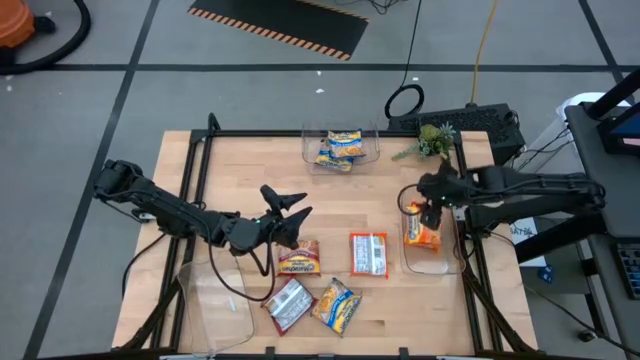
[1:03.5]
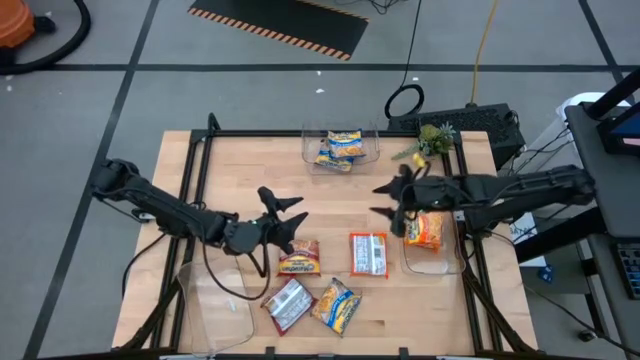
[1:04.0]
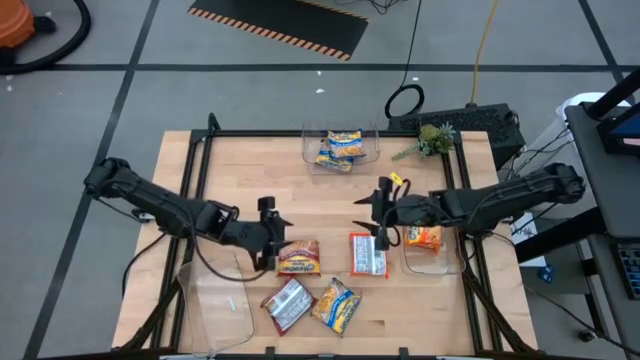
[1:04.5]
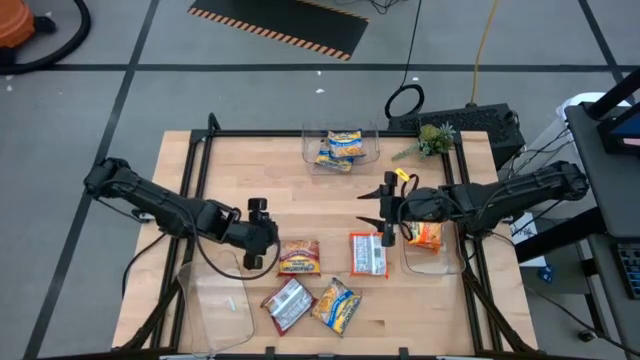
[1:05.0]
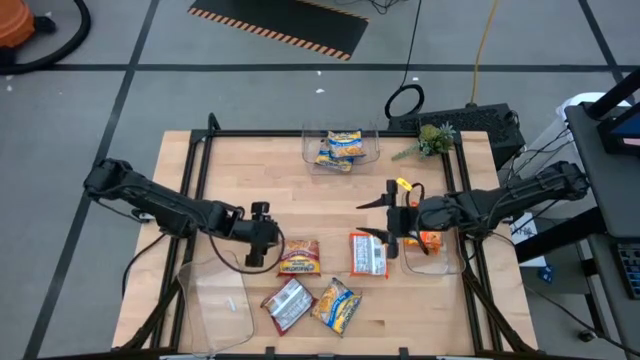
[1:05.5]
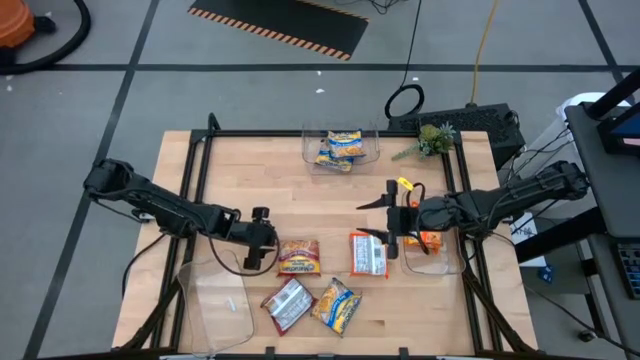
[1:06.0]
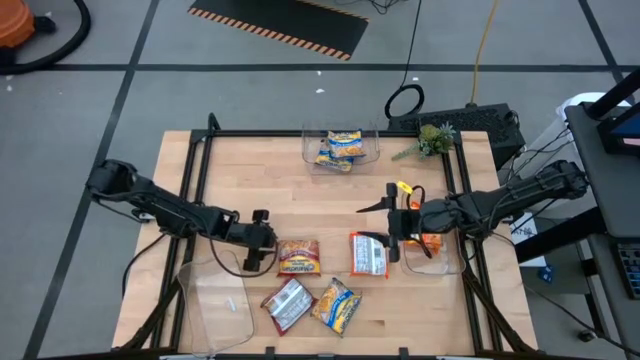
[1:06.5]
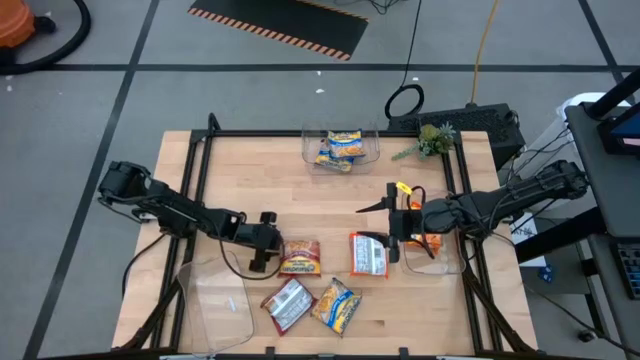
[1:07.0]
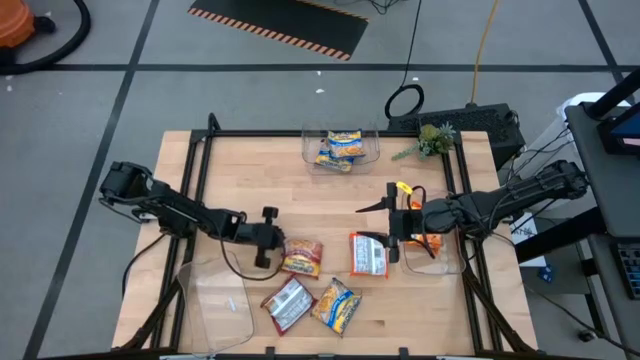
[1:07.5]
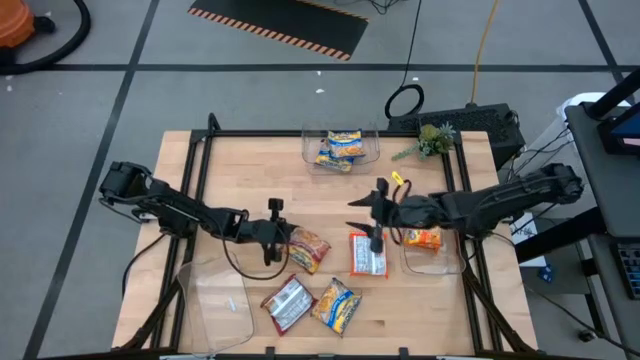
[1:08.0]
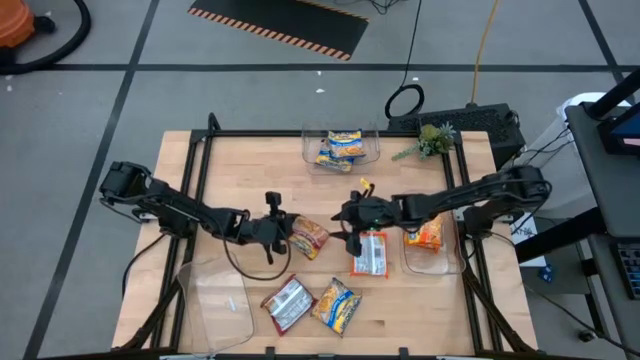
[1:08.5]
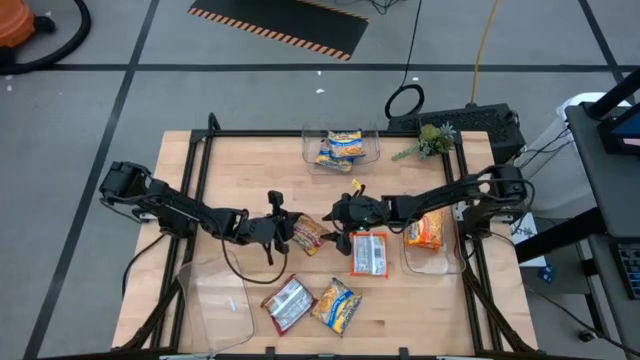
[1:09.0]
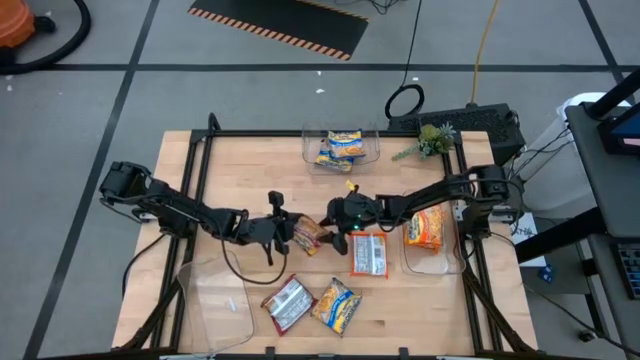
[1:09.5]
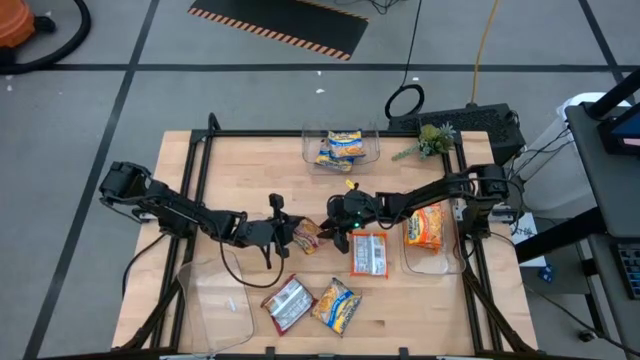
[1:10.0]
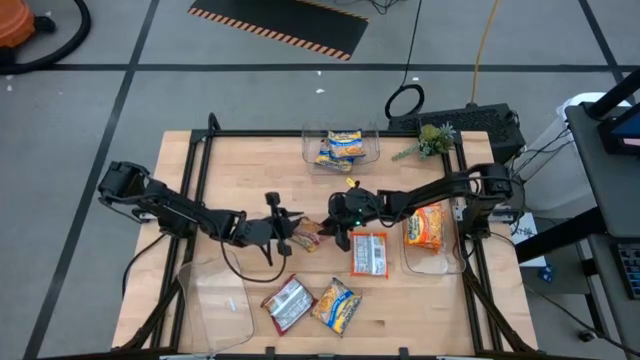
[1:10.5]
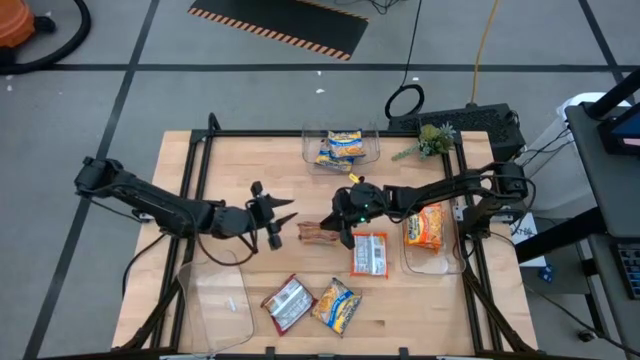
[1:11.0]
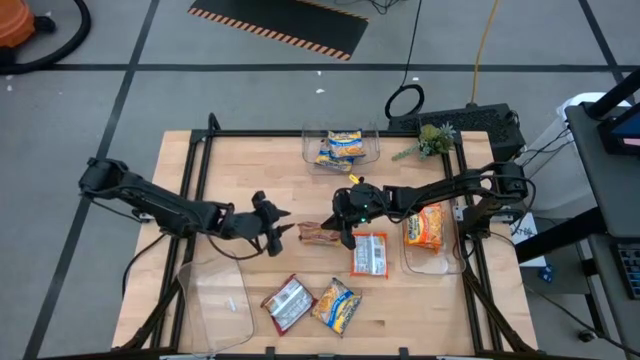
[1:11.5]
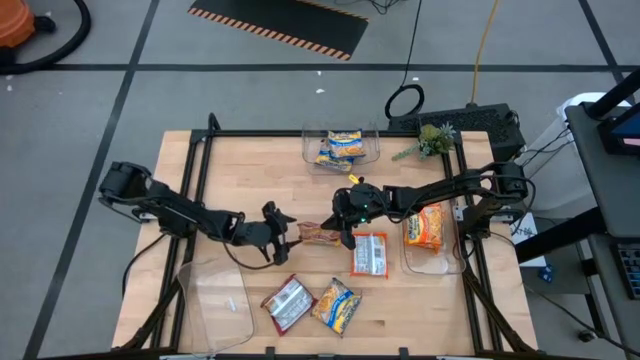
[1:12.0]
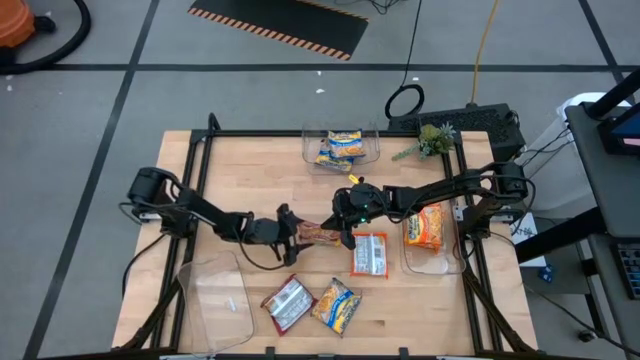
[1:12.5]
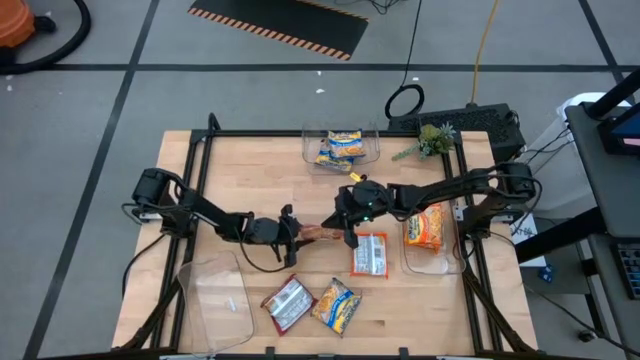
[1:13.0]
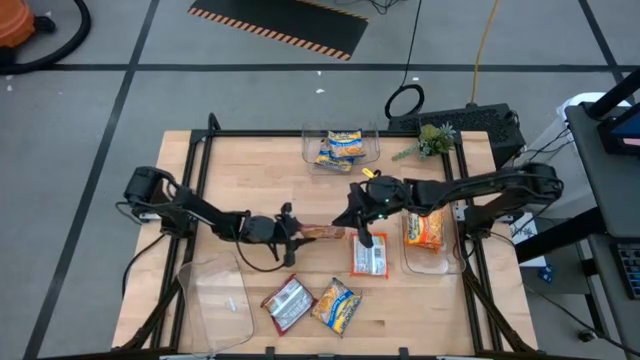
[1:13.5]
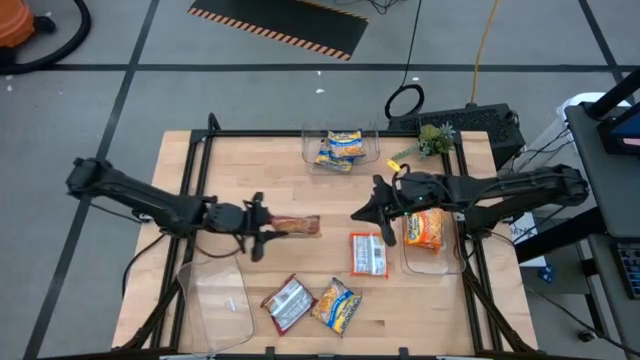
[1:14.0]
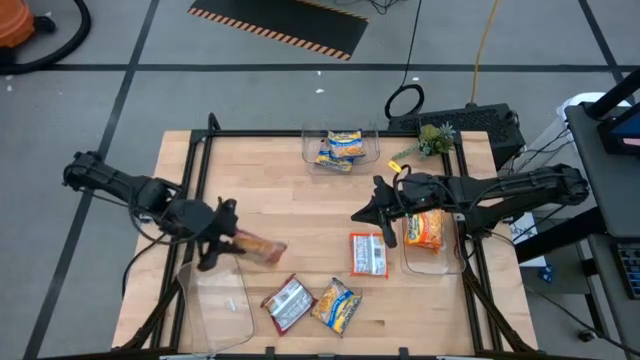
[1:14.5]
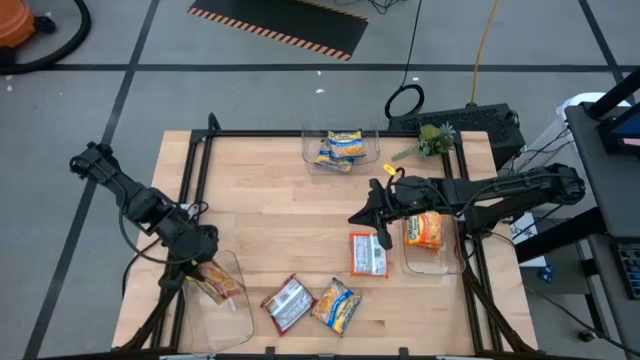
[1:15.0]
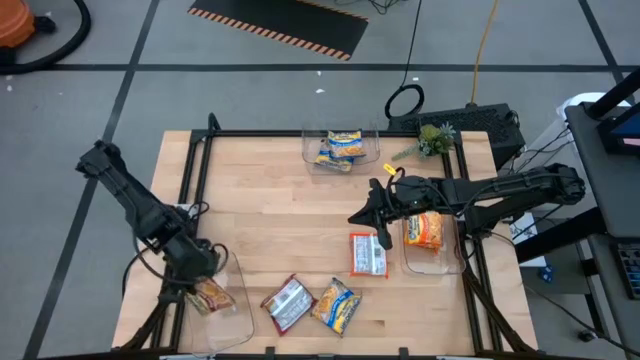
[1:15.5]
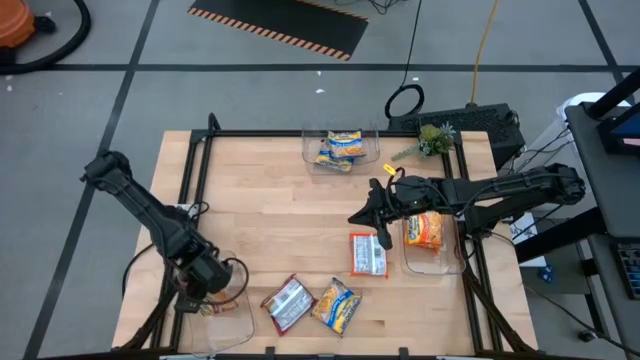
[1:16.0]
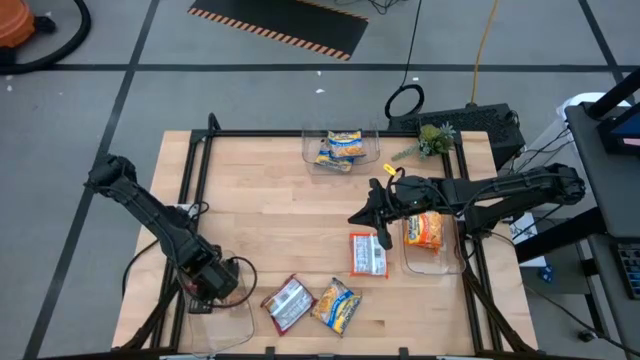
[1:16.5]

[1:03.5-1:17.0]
Task: Sort Maruchan noodles
Put the top red noodle pack into the left transparent bin

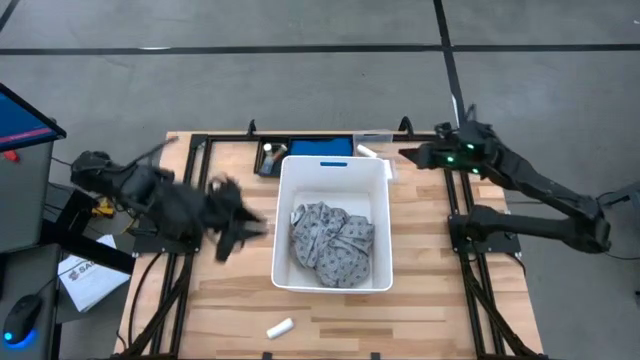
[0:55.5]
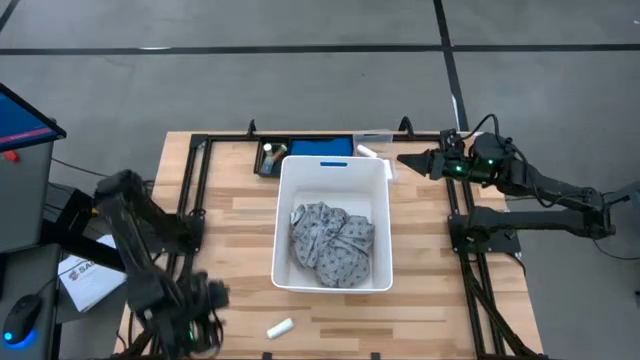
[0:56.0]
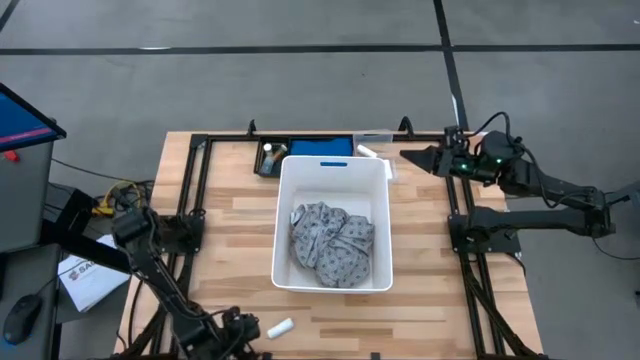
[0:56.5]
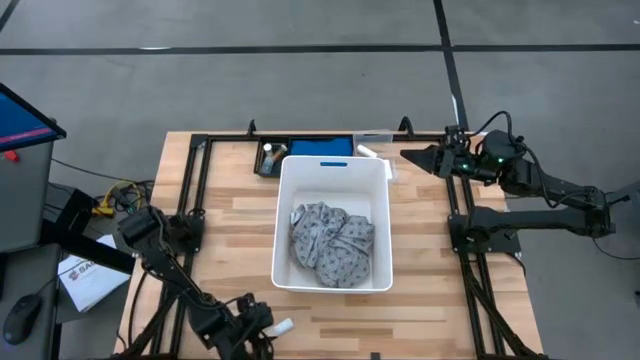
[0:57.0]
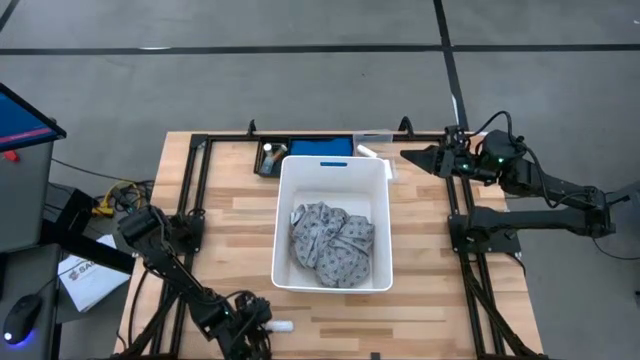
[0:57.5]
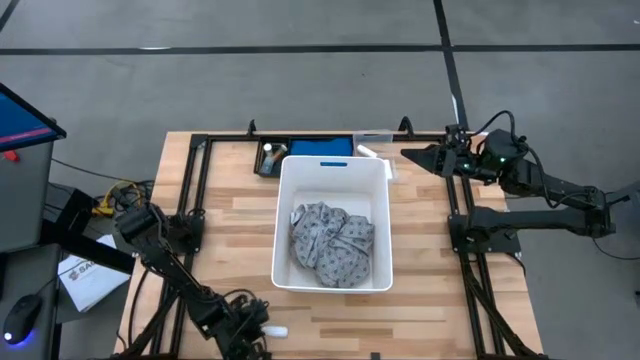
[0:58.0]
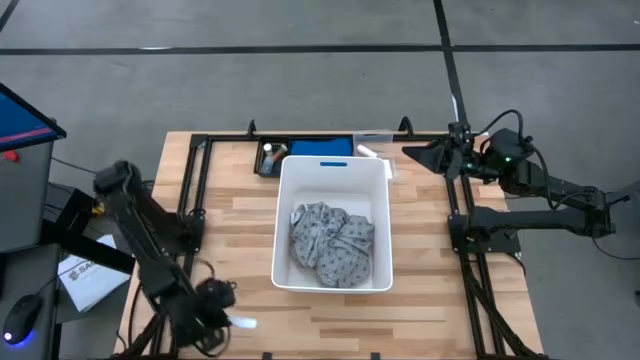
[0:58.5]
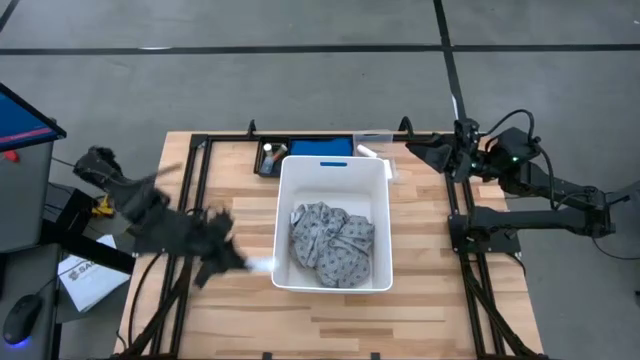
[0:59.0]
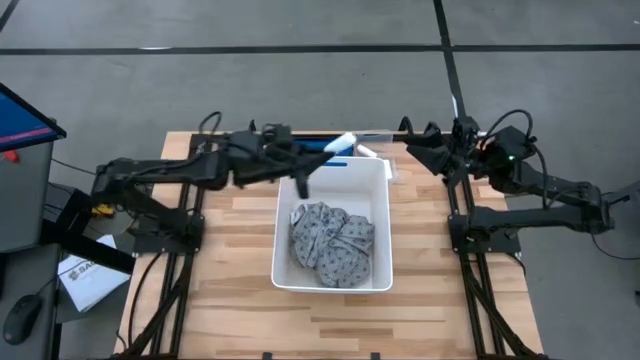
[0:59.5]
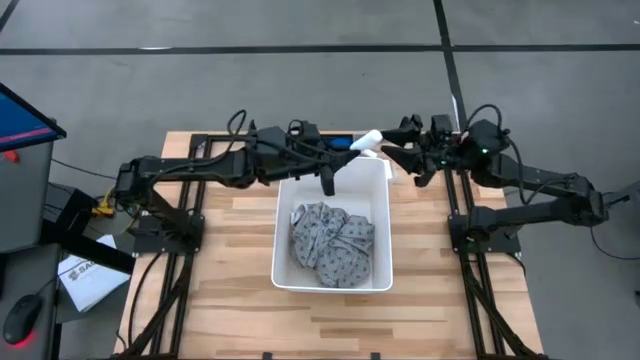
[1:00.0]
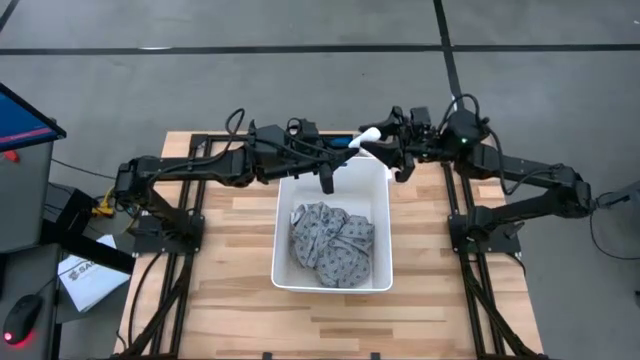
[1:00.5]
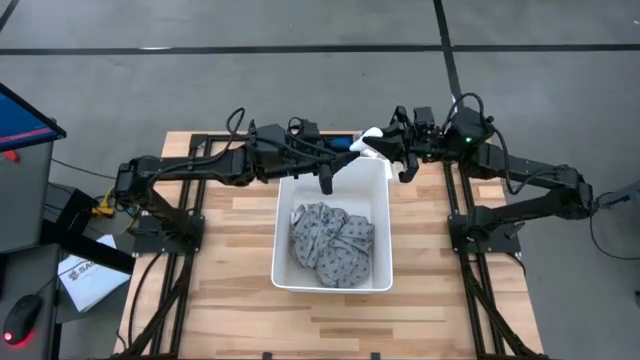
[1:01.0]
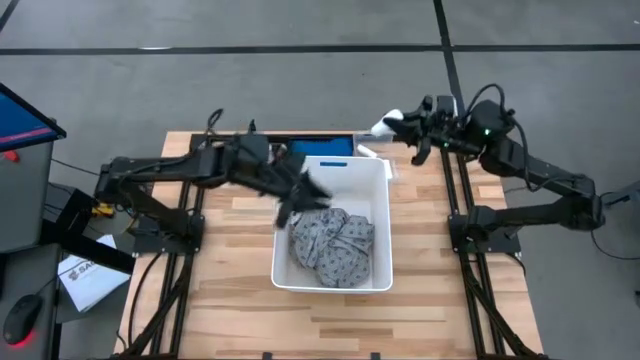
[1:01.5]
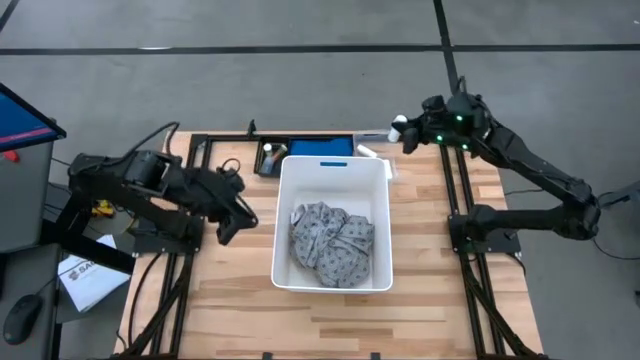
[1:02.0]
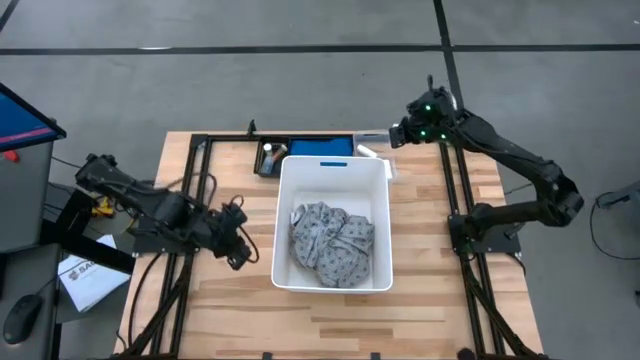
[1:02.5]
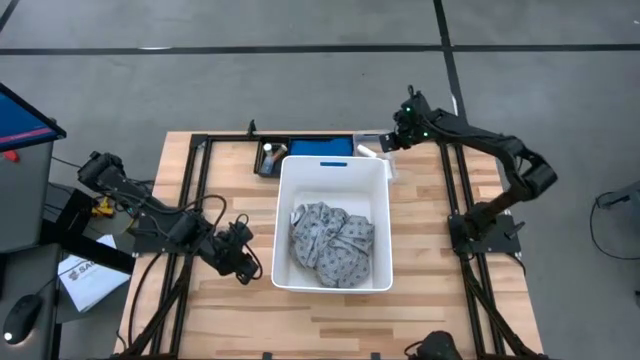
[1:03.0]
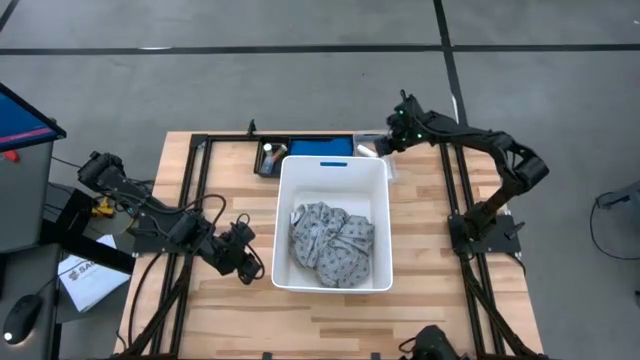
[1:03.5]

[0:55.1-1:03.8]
Task: Pick & place medical supplies in basket/bin
Put the white bandage into the transparent bin
